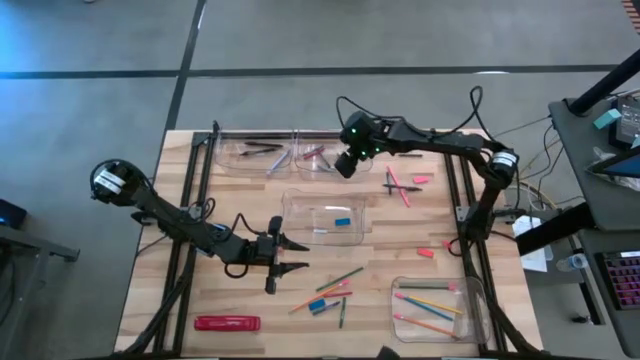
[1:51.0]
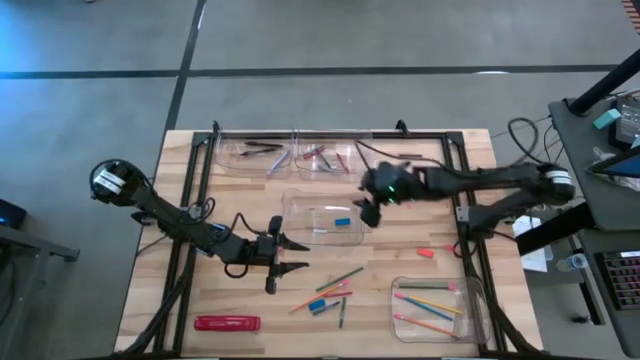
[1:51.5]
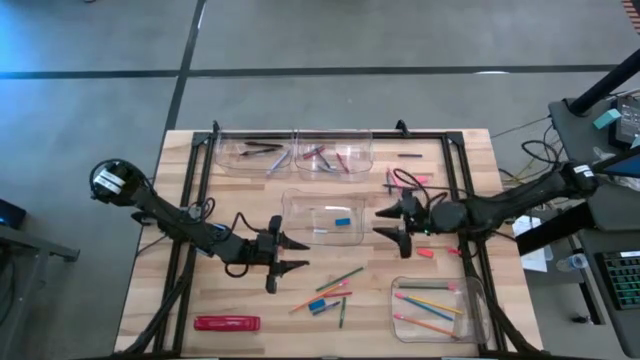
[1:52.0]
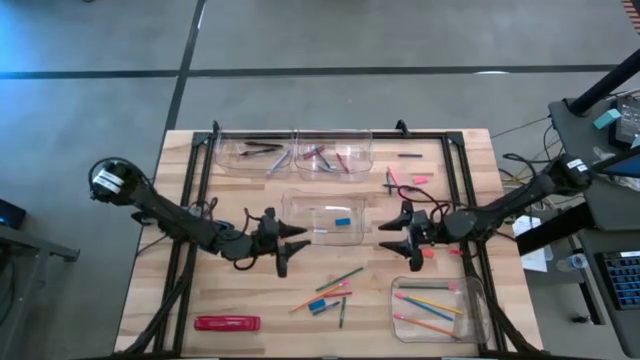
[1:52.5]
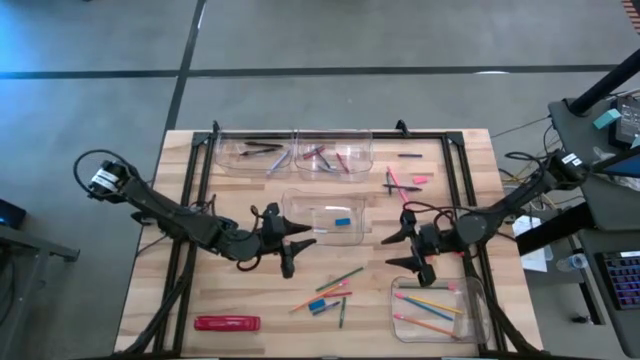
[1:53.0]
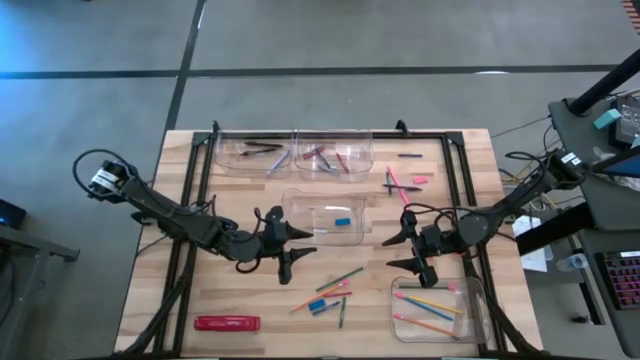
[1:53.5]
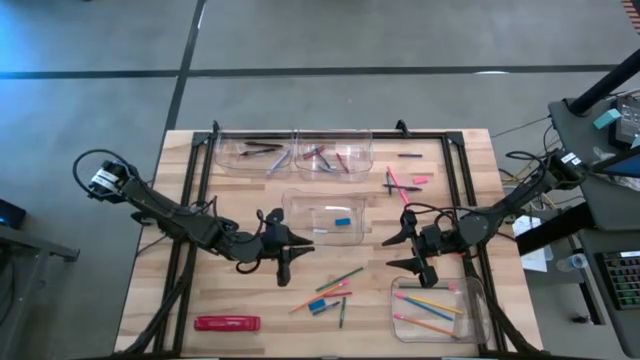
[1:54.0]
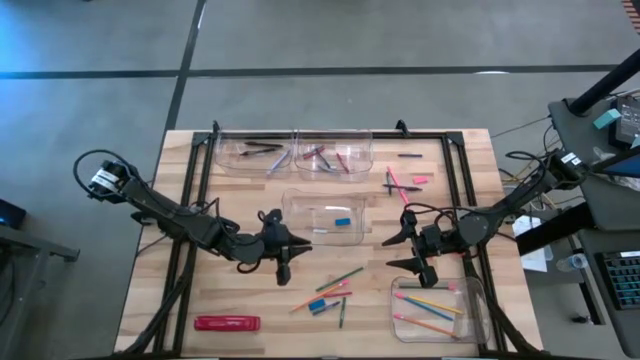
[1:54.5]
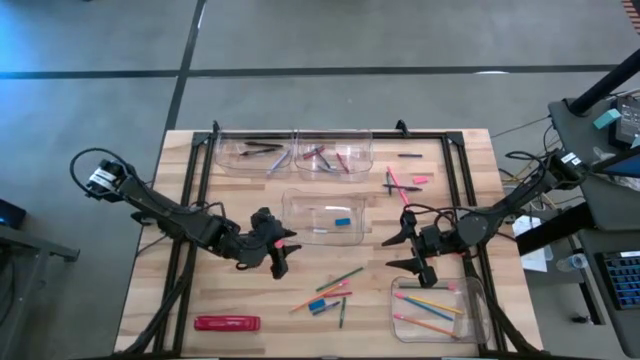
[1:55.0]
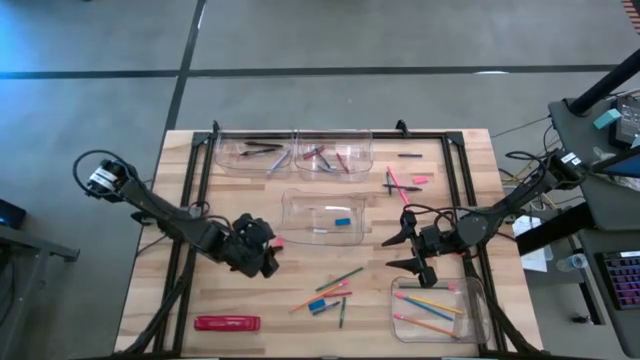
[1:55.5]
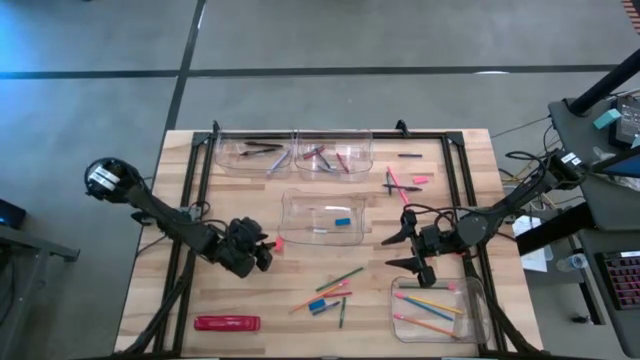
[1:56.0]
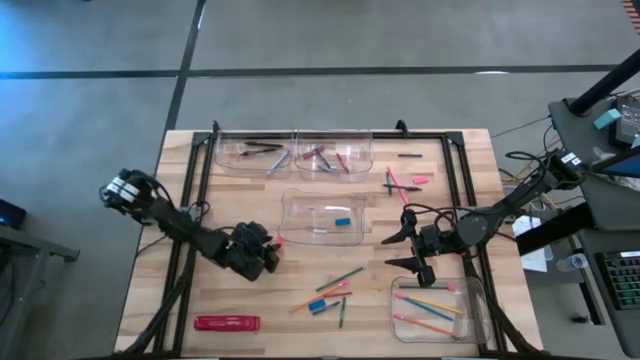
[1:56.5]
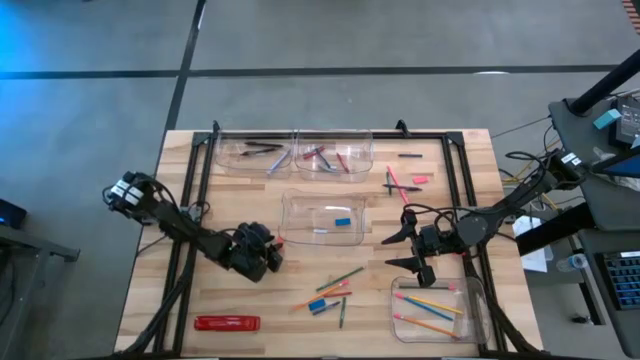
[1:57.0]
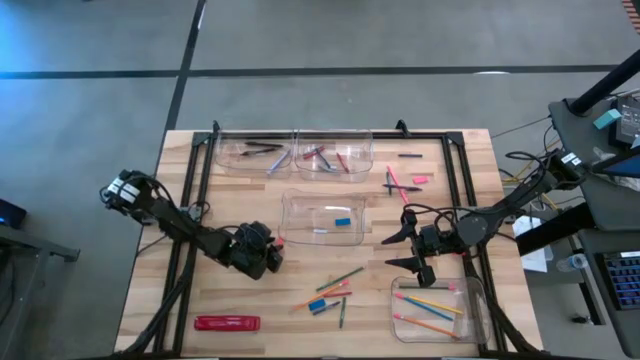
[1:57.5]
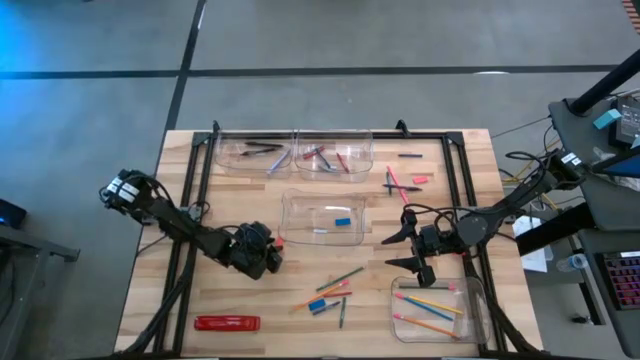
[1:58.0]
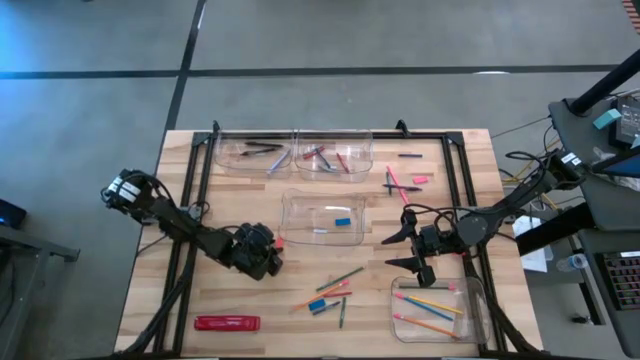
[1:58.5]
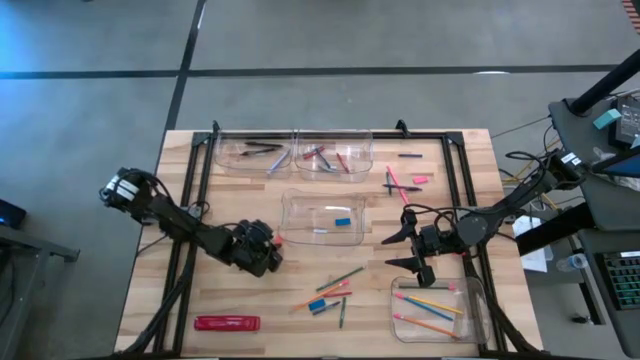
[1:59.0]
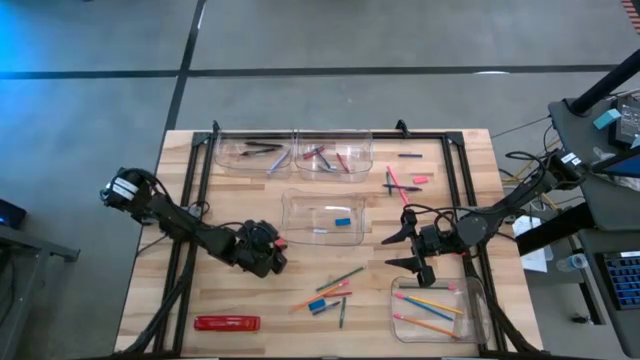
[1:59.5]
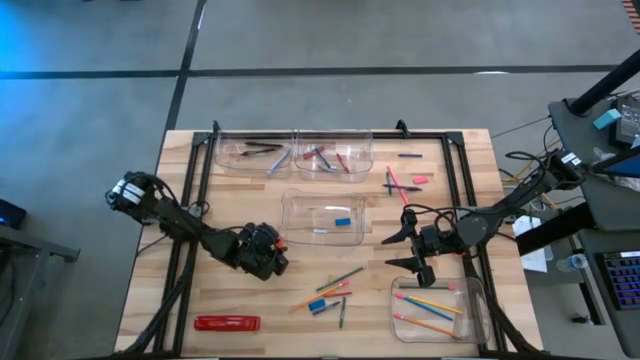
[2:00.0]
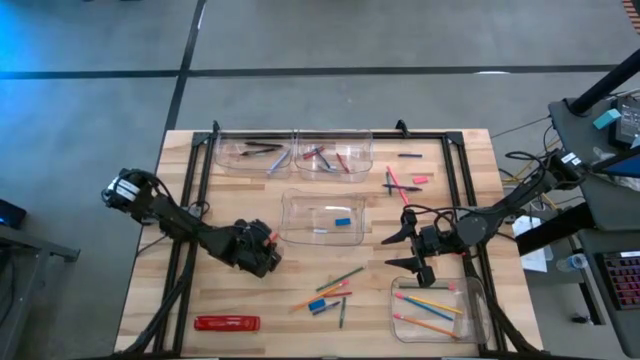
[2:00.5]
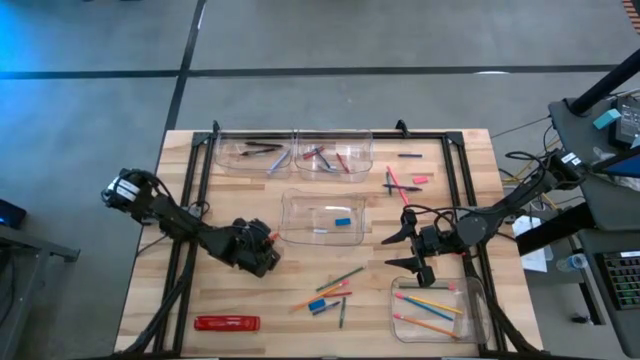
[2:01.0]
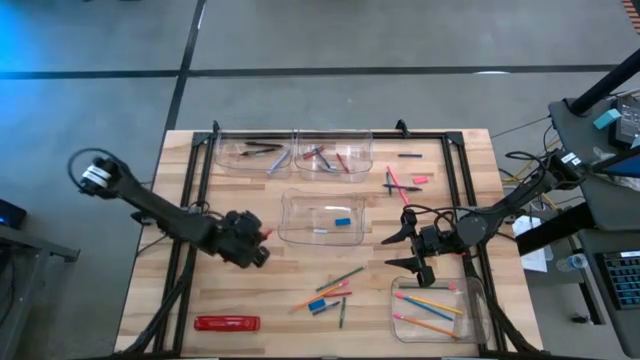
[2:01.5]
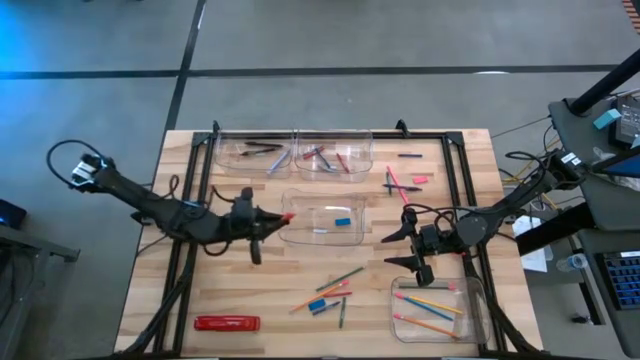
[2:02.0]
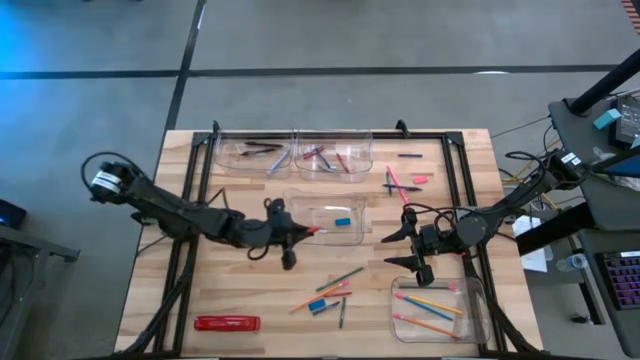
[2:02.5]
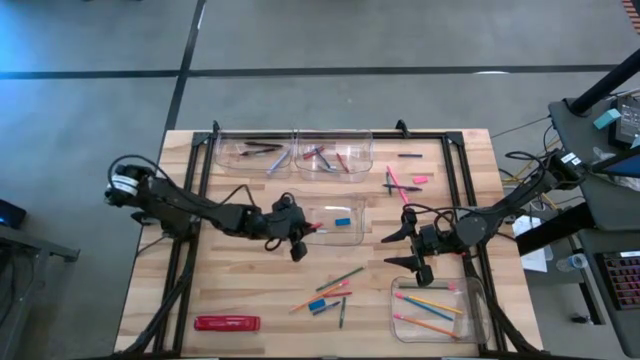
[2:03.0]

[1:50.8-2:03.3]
Task: Sort crayons/erasers/pens/pencils in bins
Put the orange eraser into the middle transparent bin

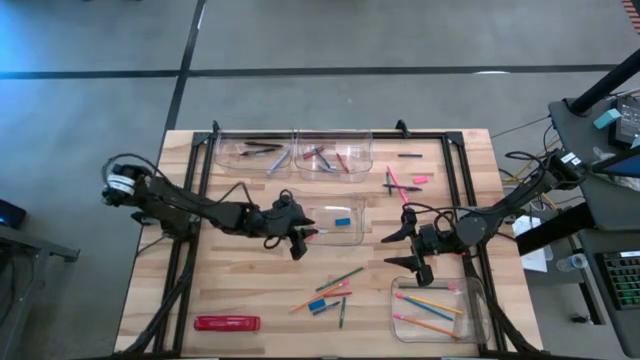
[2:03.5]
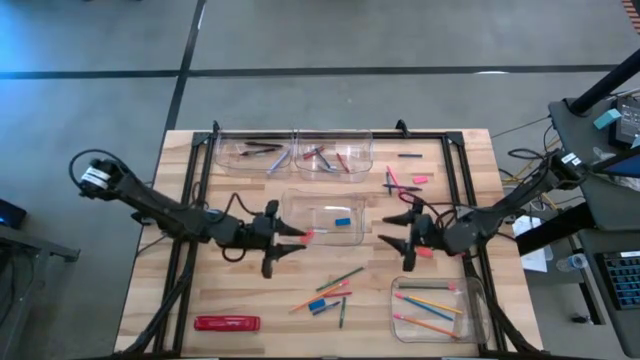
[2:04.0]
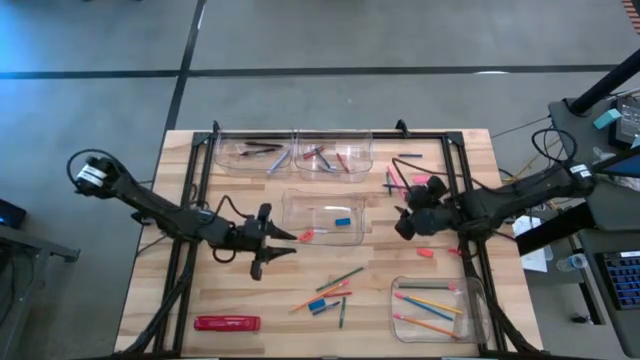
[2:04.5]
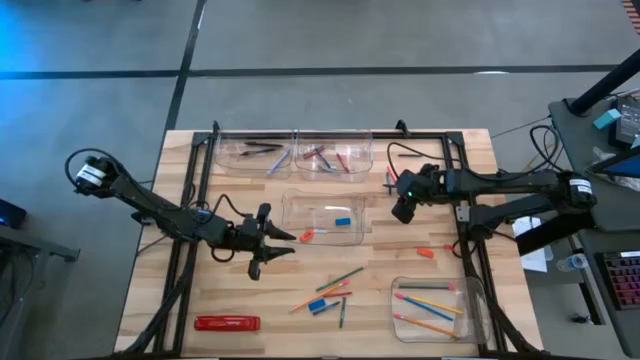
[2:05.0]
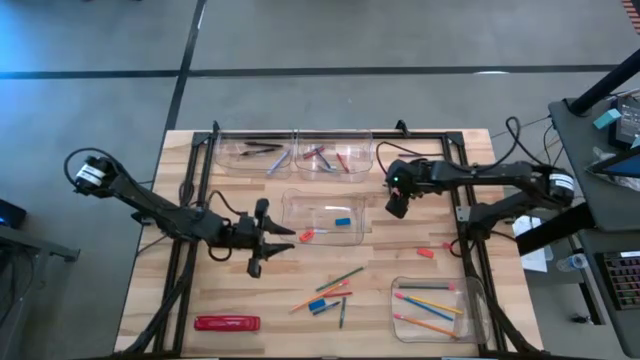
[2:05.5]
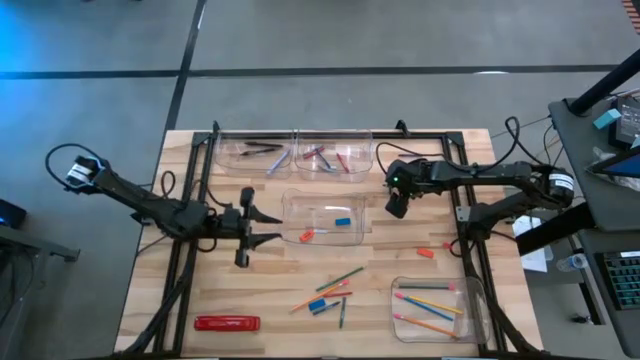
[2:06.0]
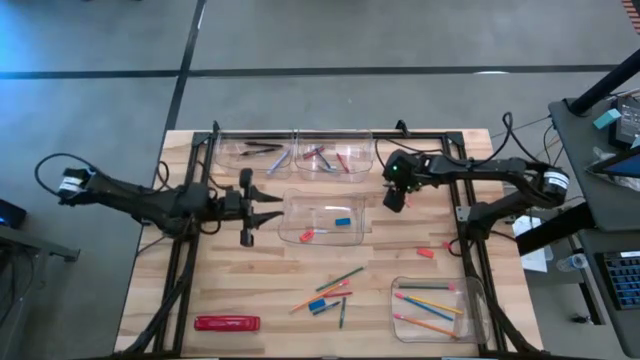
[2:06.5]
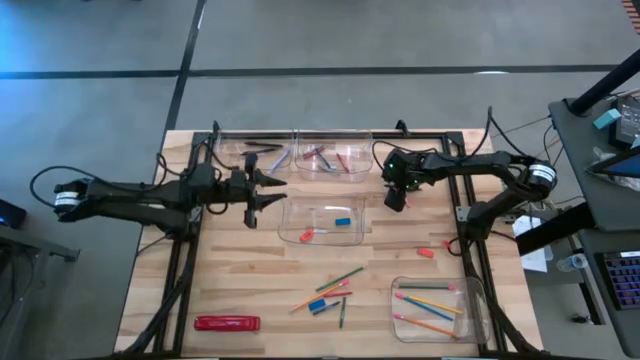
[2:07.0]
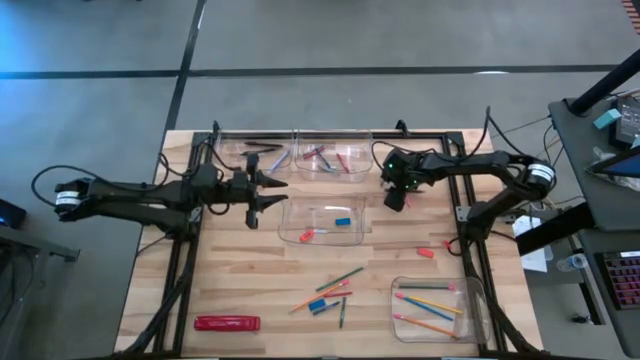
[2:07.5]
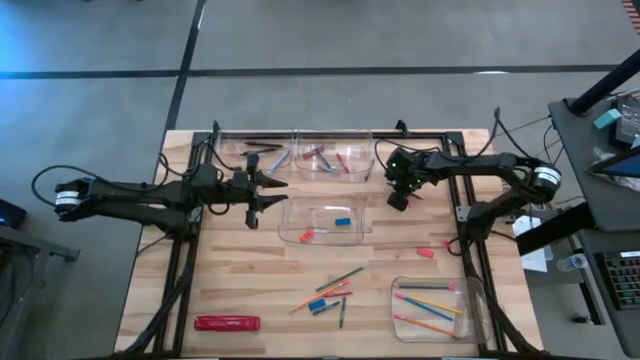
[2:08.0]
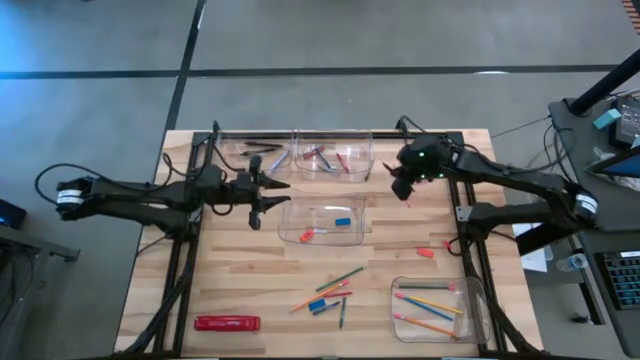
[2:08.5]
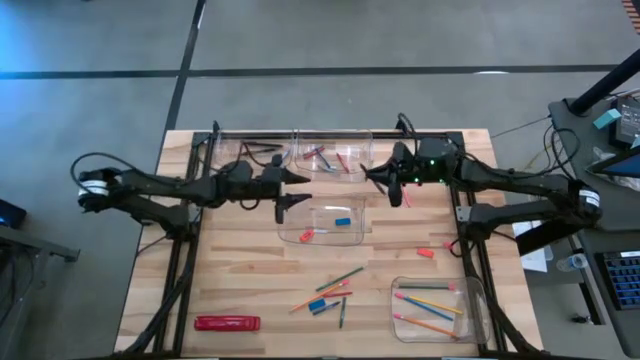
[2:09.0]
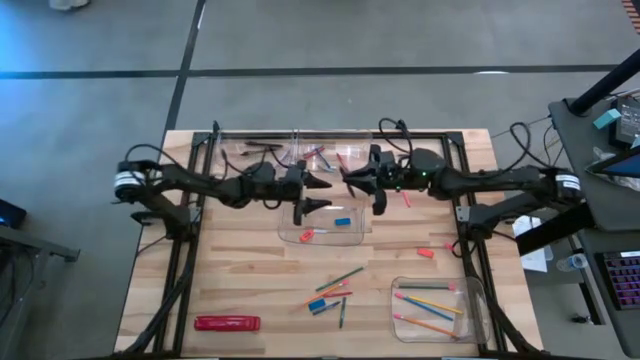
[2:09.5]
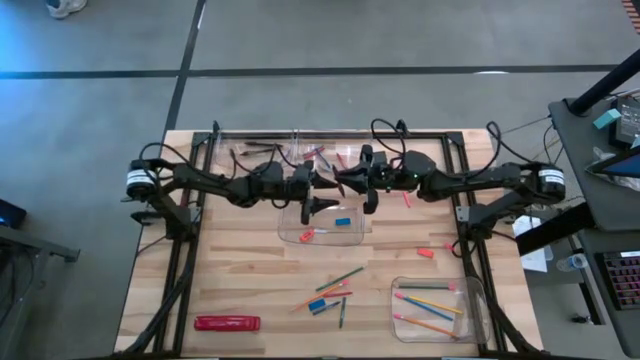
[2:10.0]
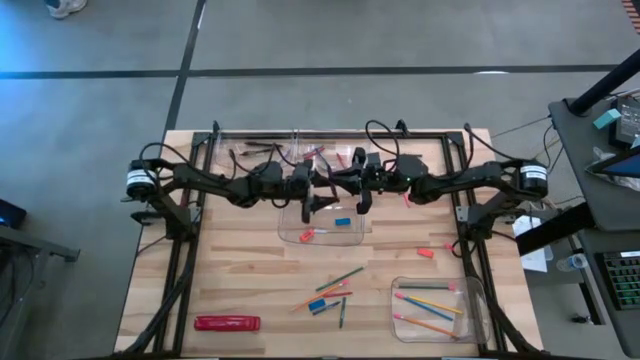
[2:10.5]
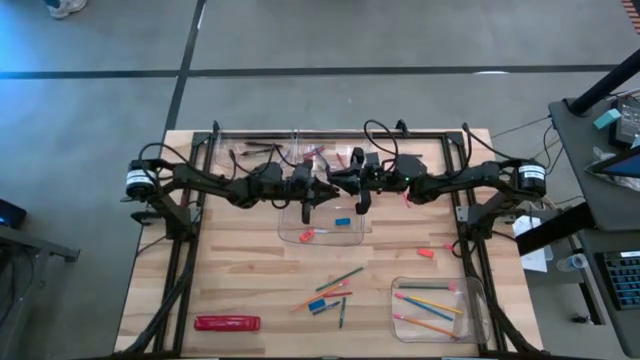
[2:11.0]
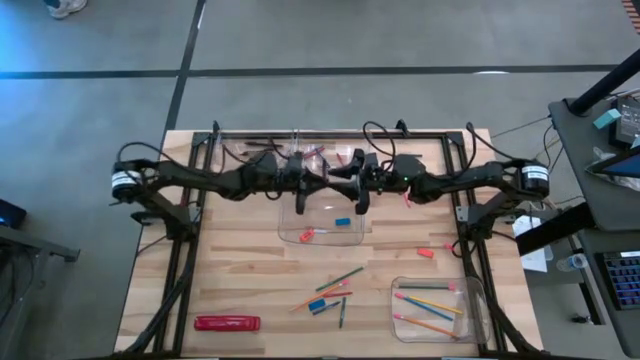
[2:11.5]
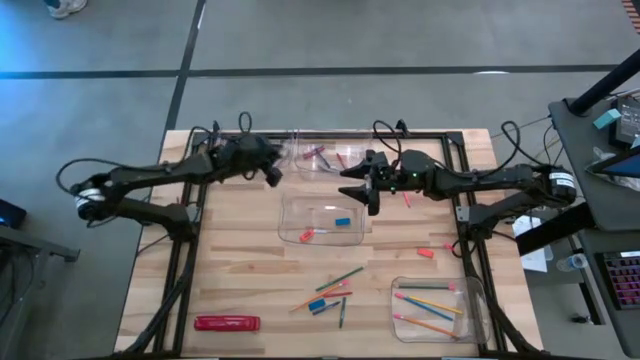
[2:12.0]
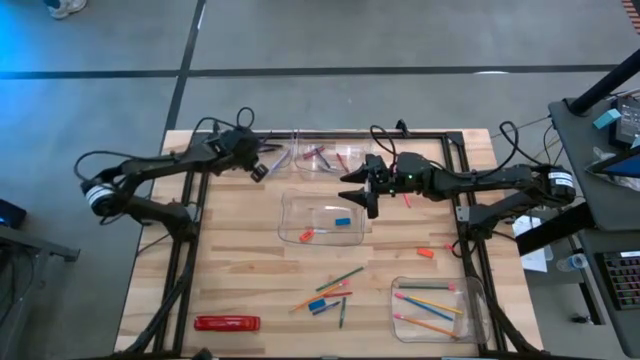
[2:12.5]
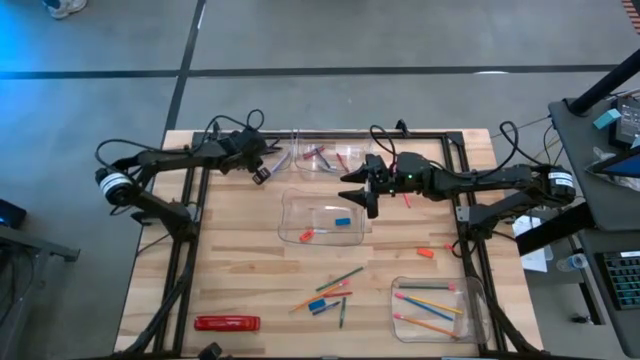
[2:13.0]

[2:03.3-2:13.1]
Put the purple pen into the top left transparent bin
